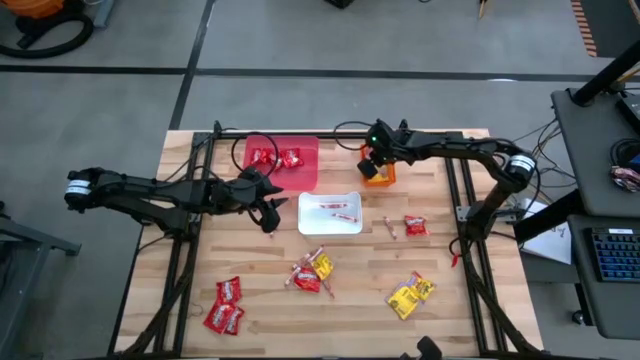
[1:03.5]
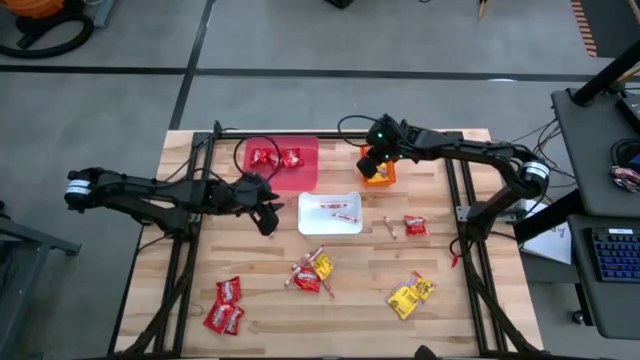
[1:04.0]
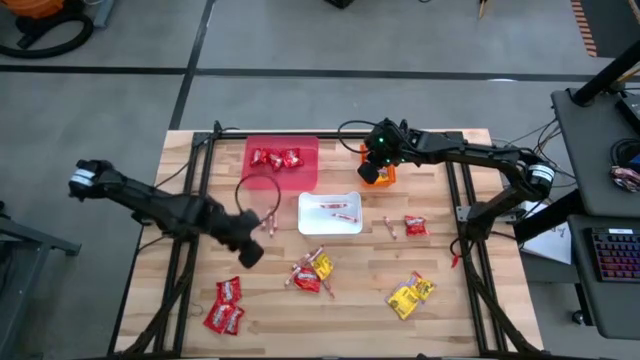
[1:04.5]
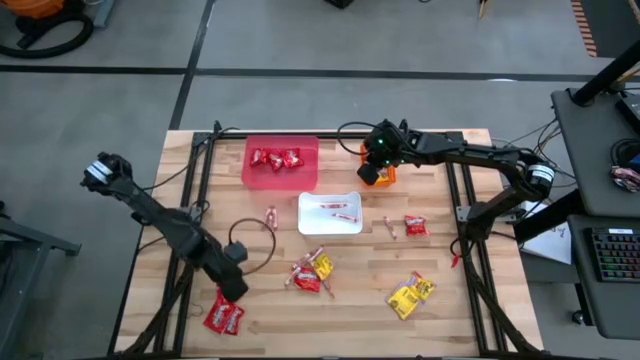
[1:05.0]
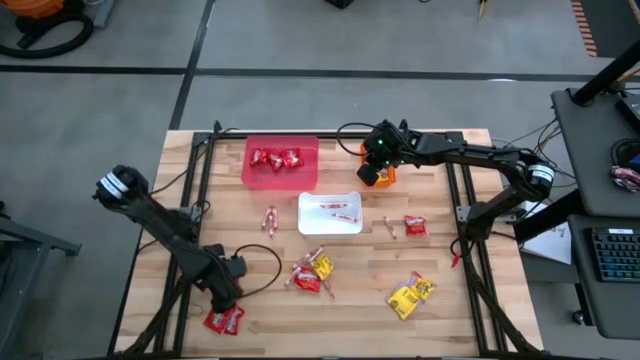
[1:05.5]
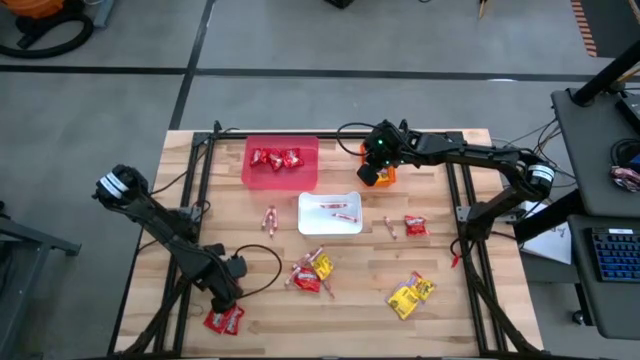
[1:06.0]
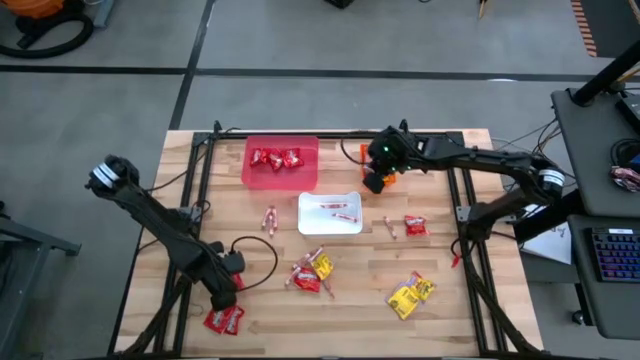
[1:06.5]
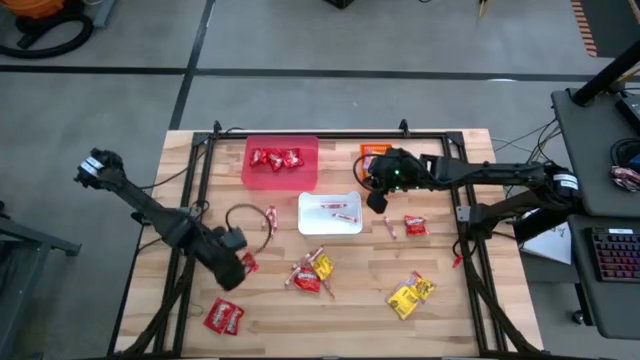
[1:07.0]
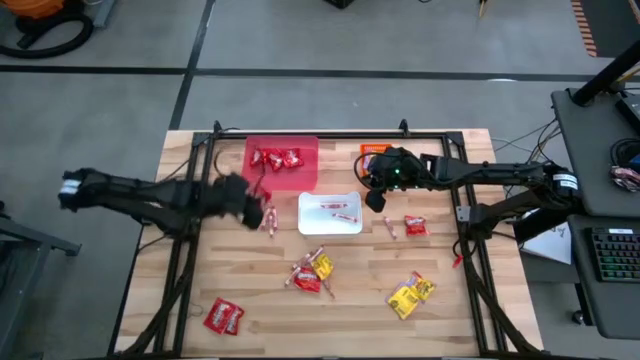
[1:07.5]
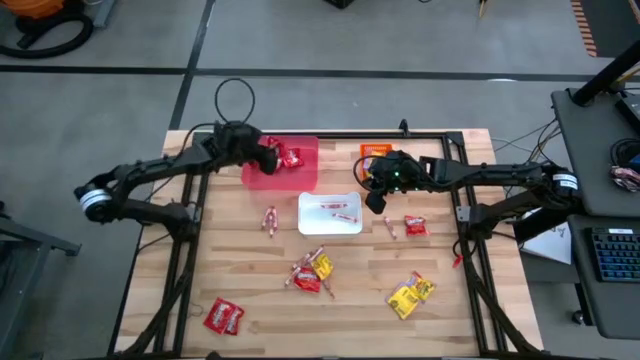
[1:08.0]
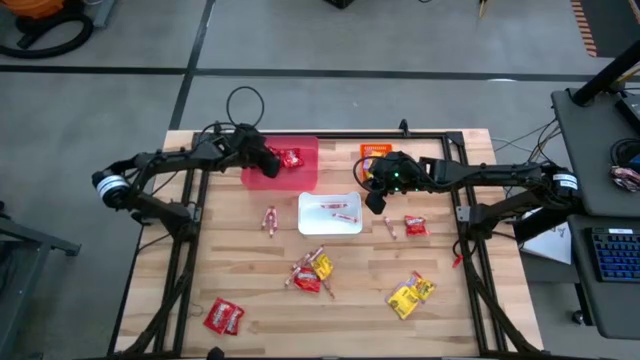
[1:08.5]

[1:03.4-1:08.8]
Task: Sort candy
Put the red chocolate into the red bin

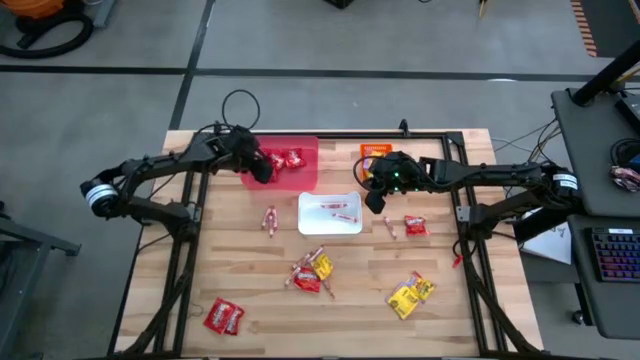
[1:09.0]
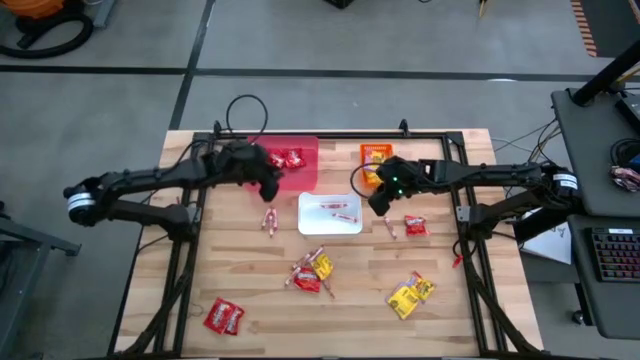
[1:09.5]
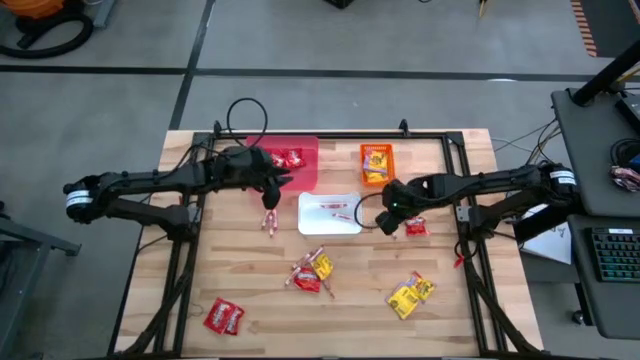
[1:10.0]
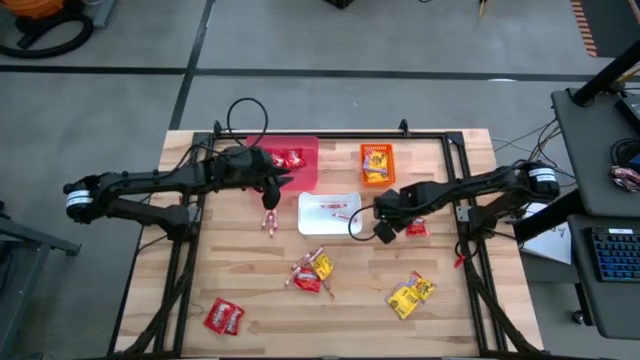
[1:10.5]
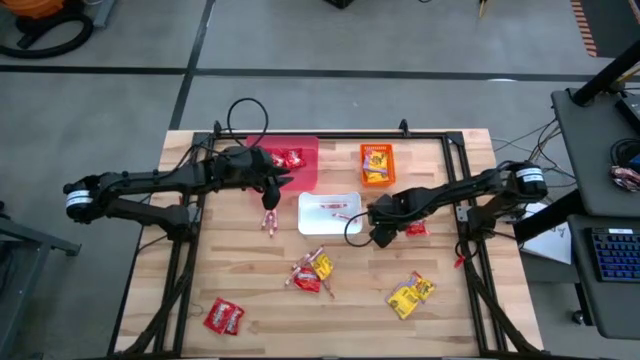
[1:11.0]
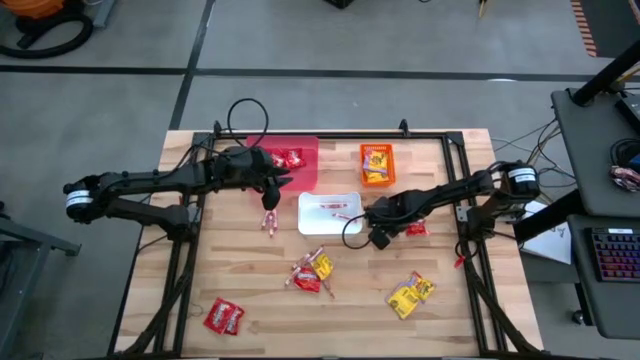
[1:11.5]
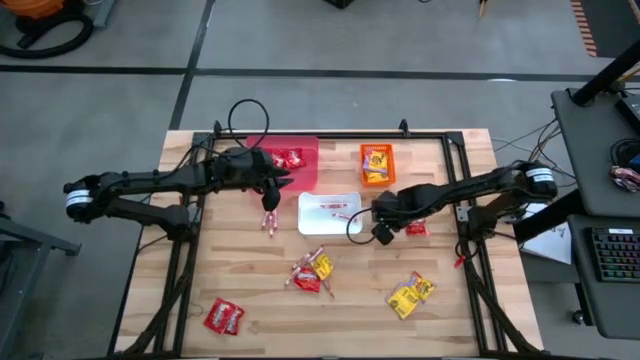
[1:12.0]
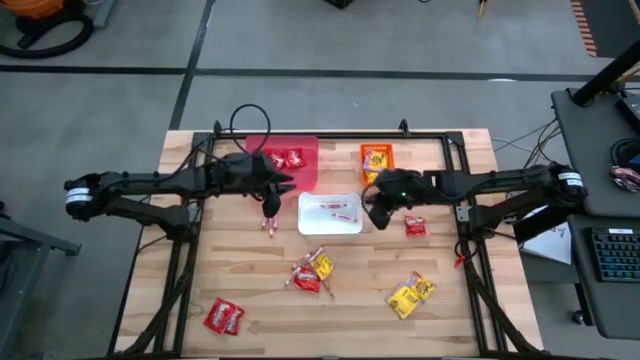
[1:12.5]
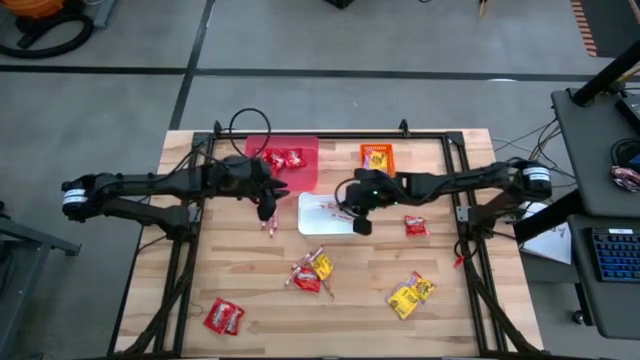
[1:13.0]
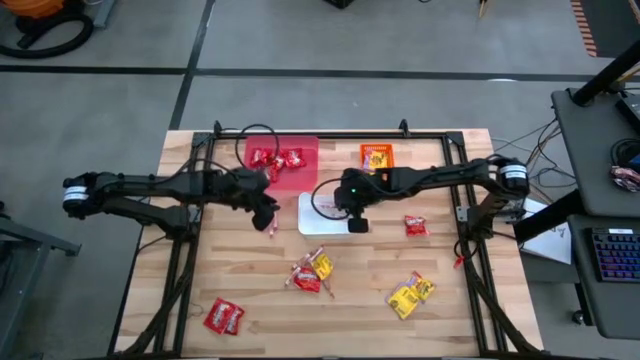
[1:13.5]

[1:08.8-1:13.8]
Put the white candy into the white bin

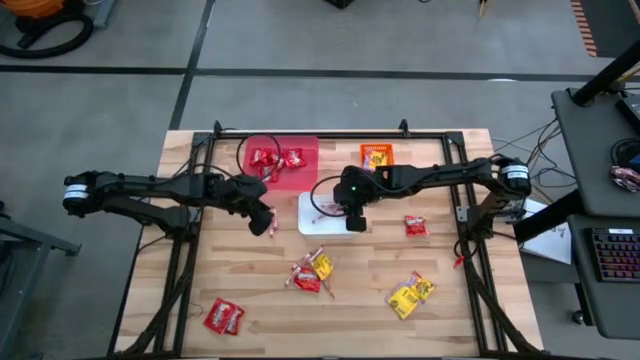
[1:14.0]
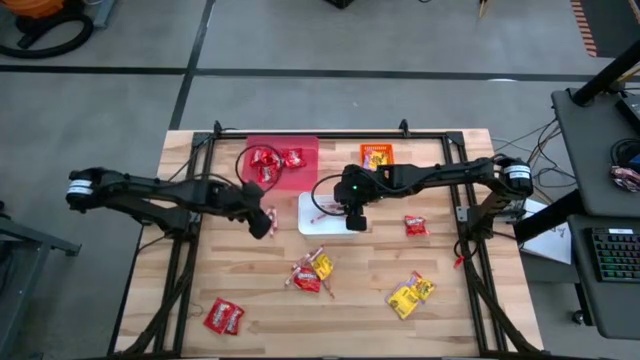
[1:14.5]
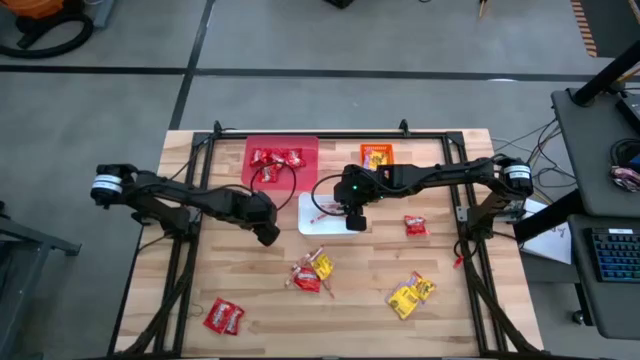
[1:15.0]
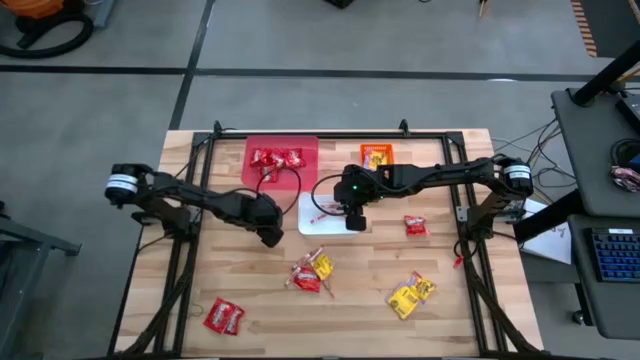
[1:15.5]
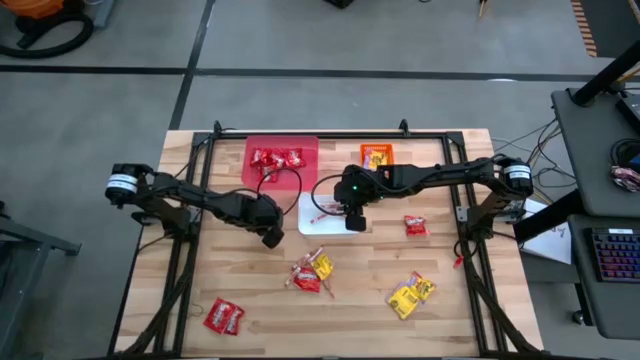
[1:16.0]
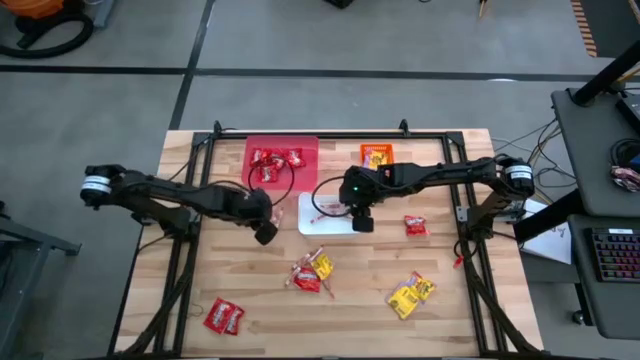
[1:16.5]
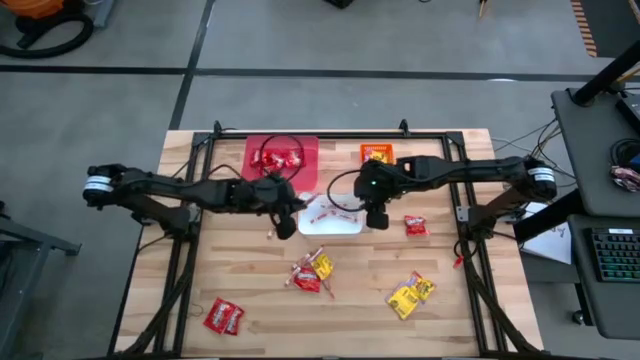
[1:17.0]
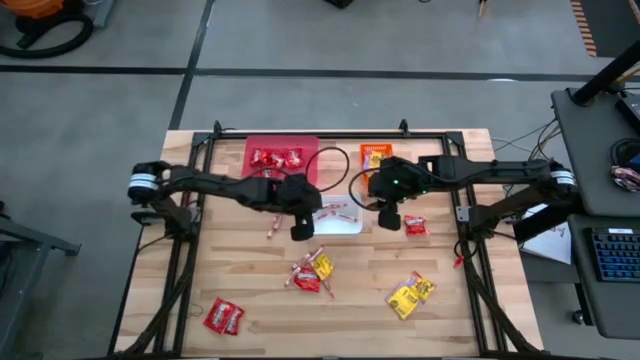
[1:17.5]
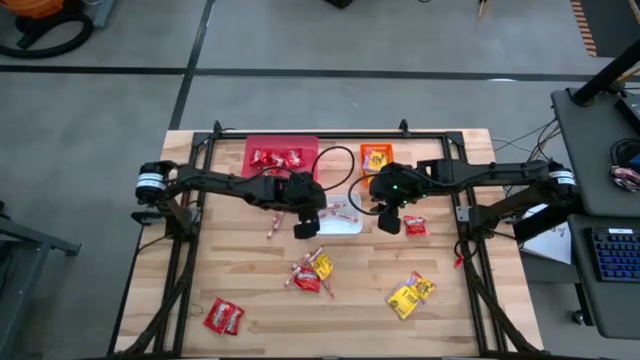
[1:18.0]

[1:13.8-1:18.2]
Put the white candy into the white bin

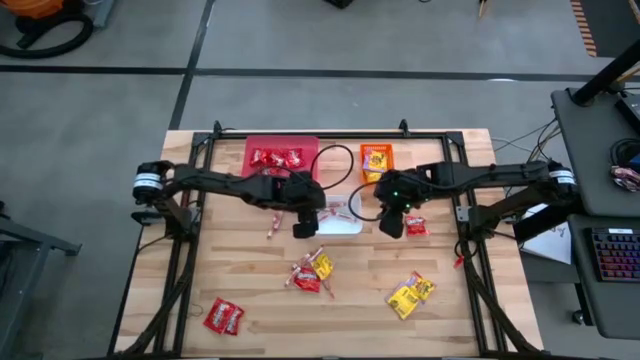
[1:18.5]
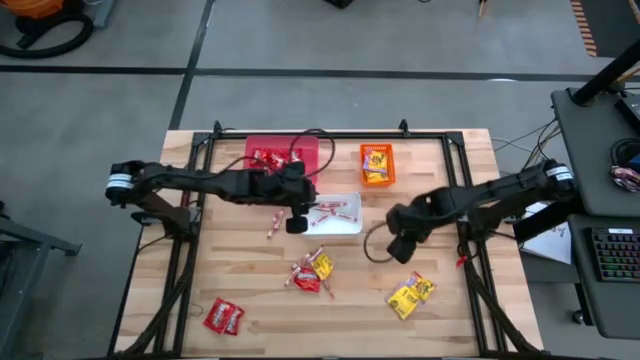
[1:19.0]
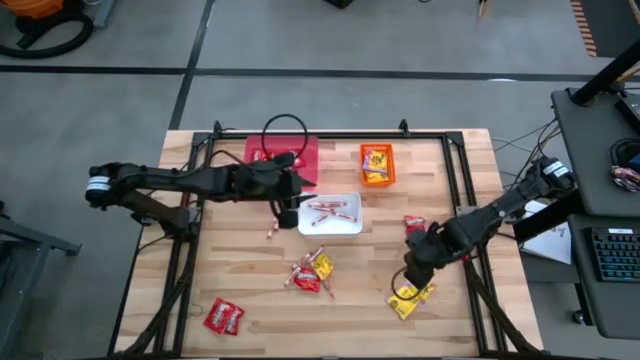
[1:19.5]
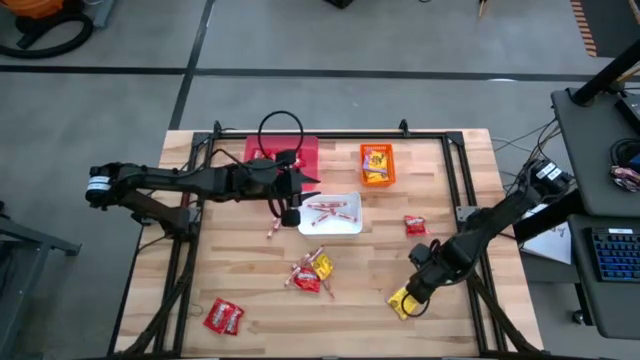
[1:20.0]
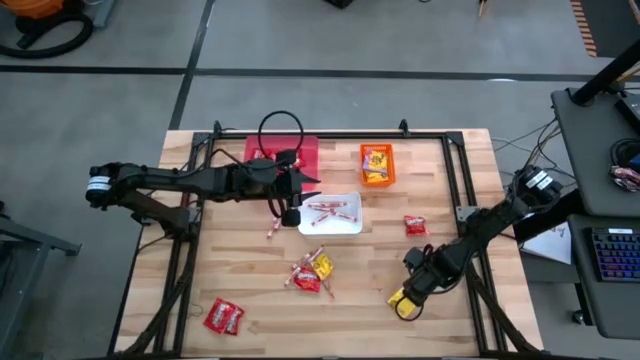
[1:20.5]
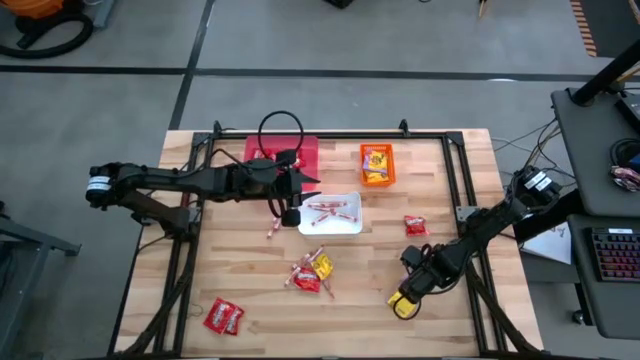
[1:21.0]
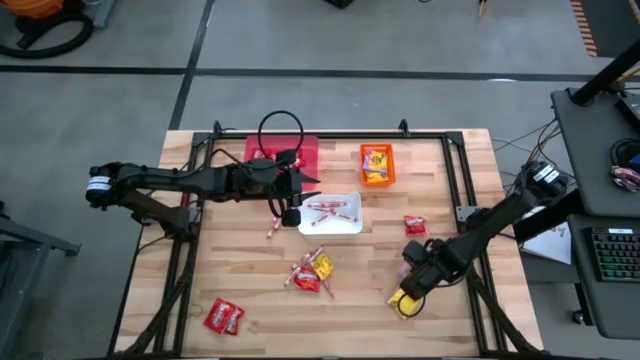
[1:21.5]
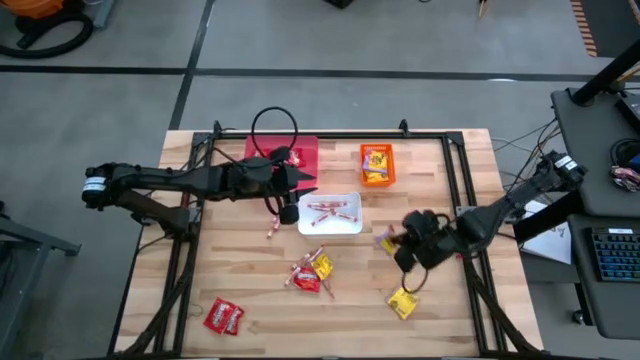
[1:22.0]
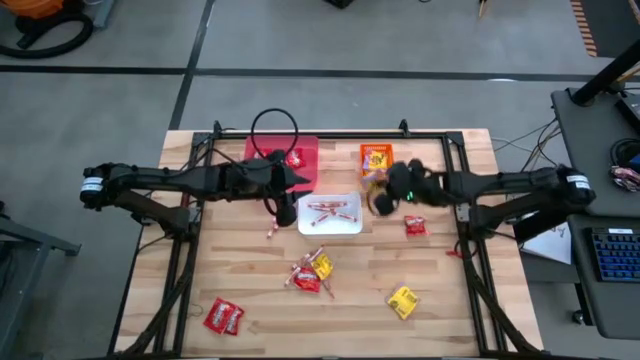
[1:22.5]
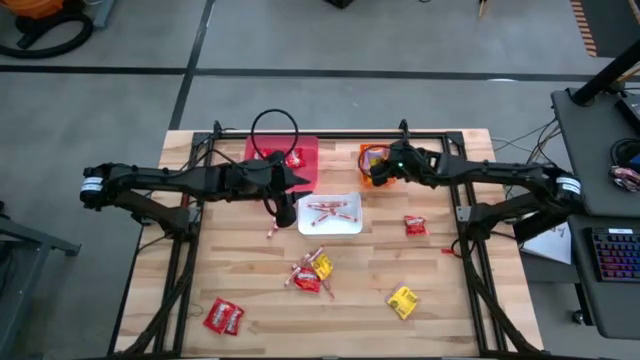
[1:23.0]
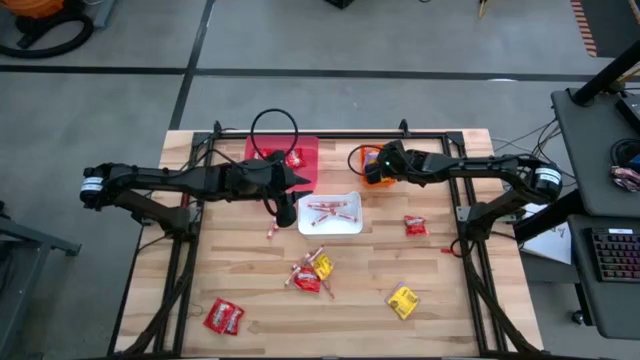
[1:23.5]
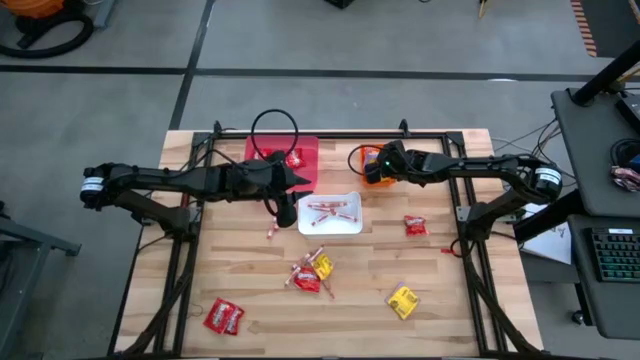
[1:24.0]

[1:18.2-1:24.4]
Put the yellow candy into the orange bin
